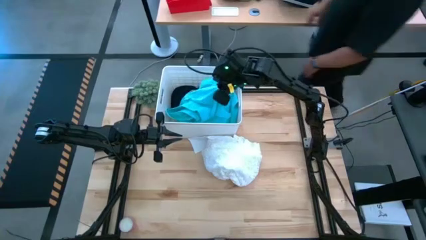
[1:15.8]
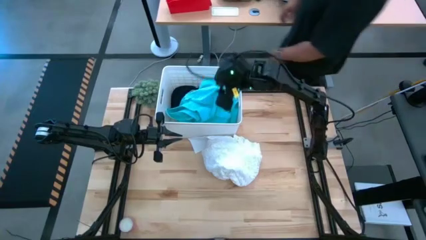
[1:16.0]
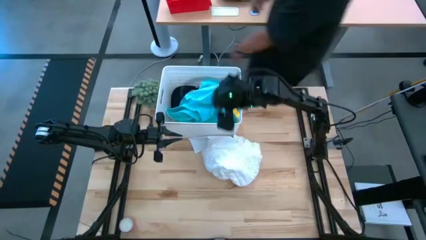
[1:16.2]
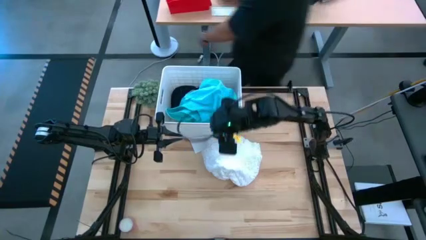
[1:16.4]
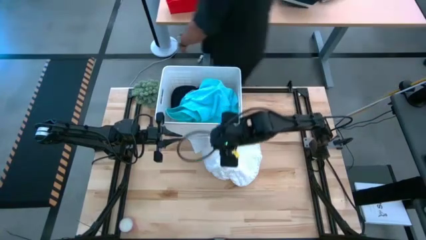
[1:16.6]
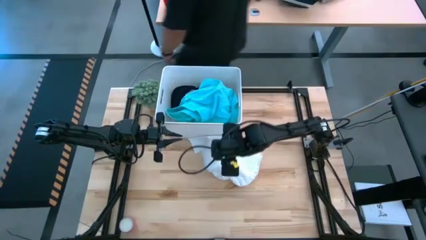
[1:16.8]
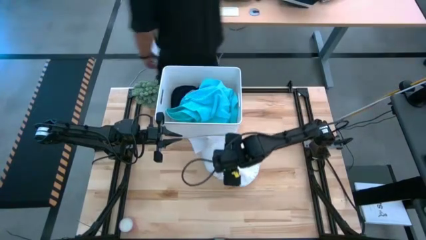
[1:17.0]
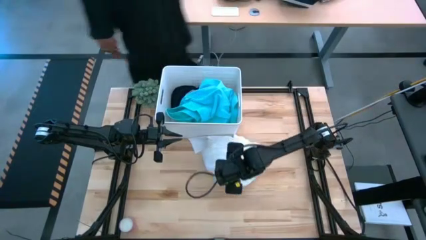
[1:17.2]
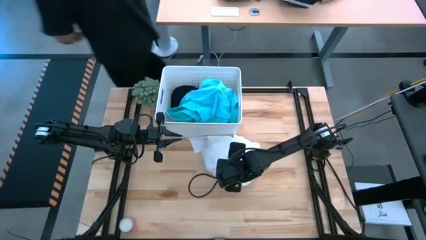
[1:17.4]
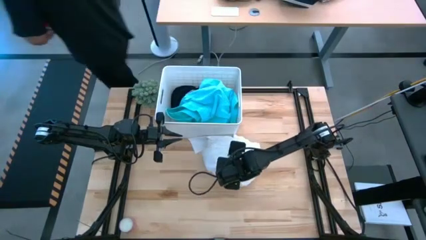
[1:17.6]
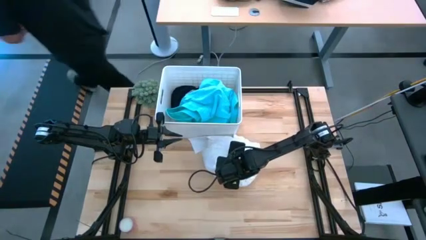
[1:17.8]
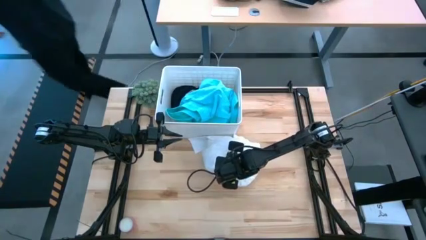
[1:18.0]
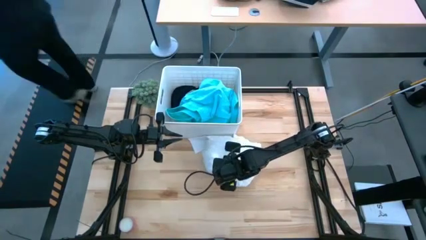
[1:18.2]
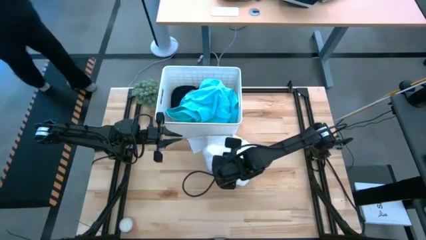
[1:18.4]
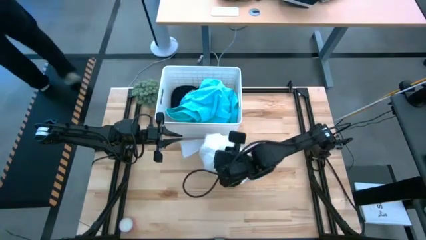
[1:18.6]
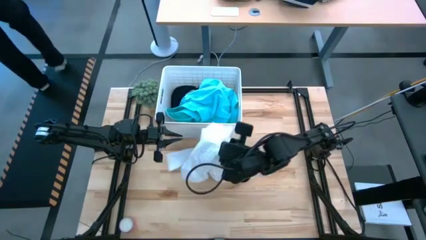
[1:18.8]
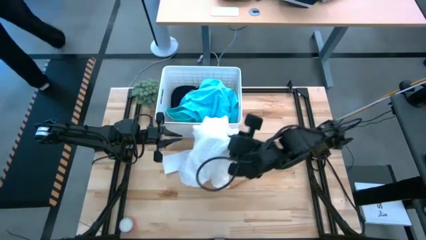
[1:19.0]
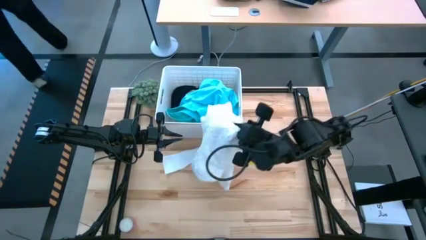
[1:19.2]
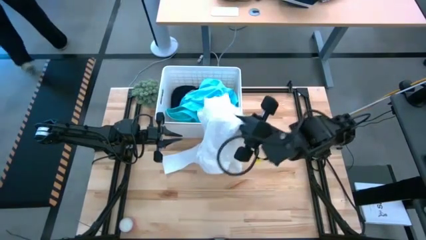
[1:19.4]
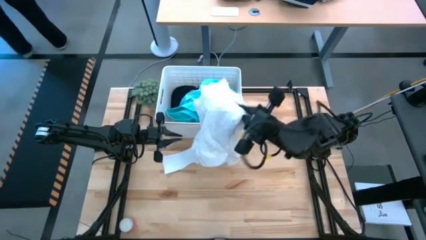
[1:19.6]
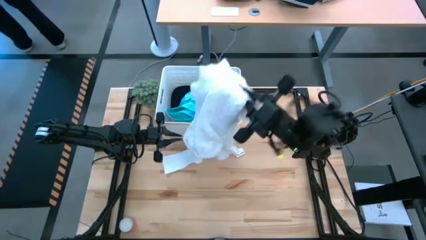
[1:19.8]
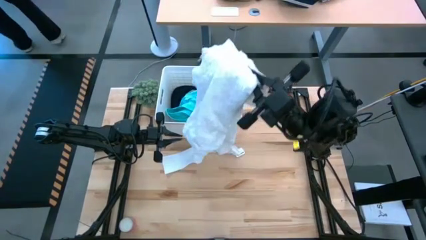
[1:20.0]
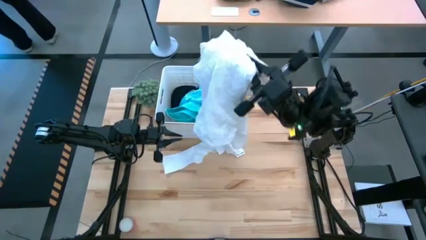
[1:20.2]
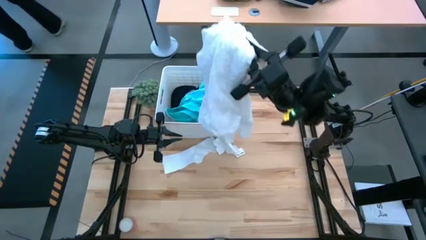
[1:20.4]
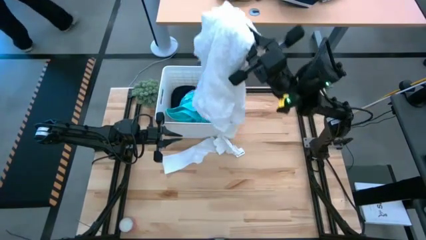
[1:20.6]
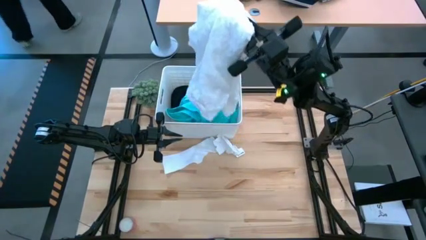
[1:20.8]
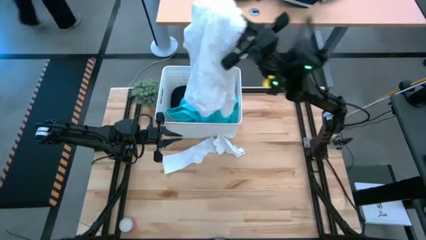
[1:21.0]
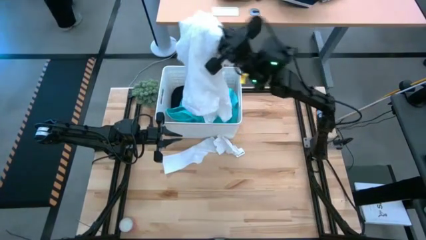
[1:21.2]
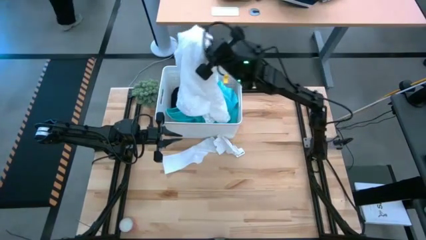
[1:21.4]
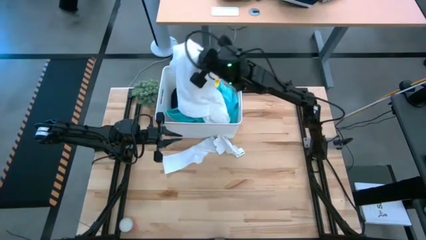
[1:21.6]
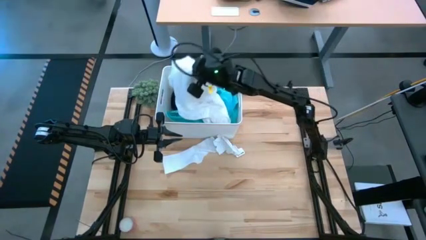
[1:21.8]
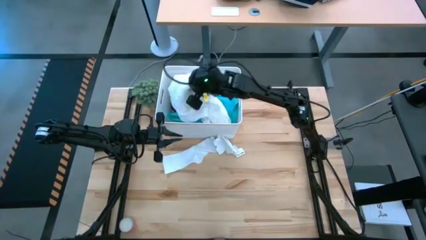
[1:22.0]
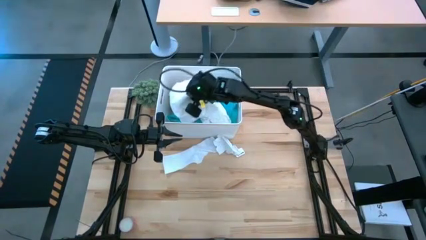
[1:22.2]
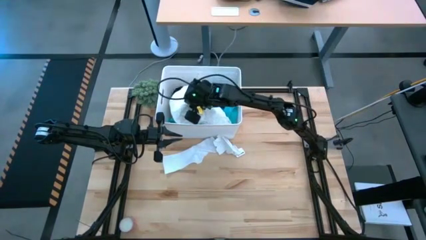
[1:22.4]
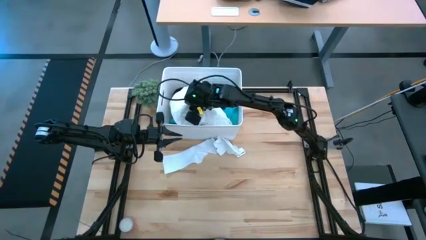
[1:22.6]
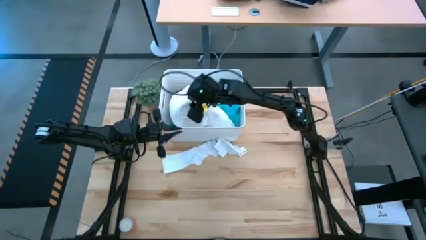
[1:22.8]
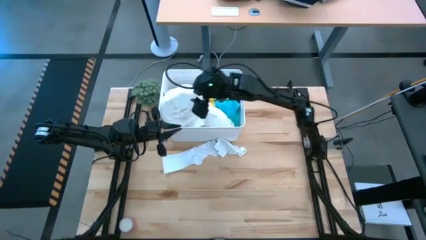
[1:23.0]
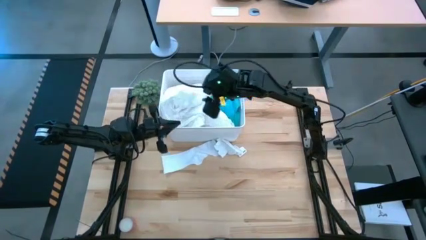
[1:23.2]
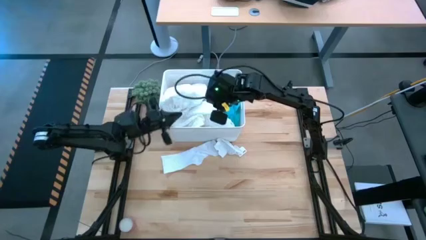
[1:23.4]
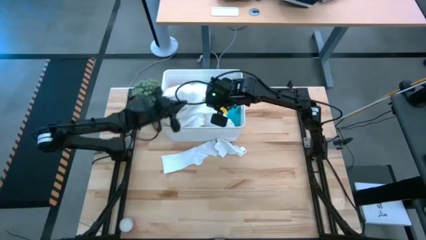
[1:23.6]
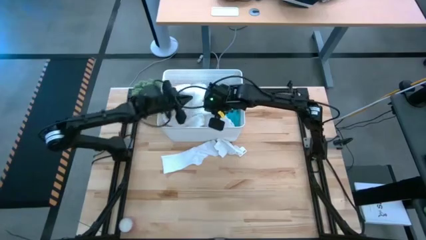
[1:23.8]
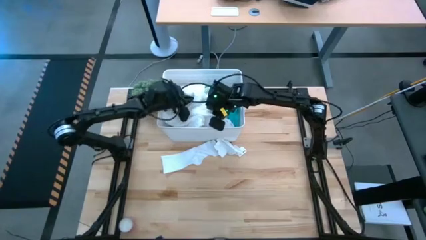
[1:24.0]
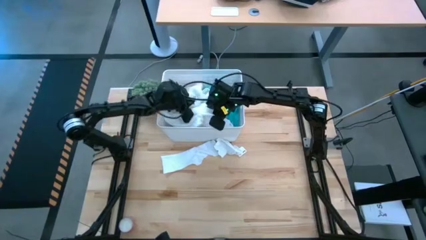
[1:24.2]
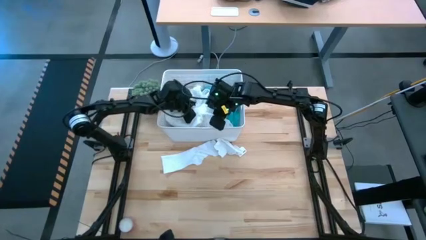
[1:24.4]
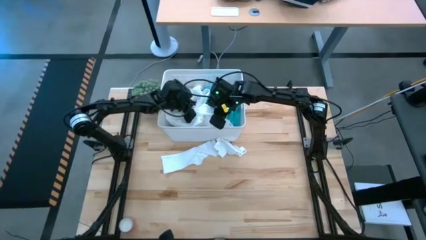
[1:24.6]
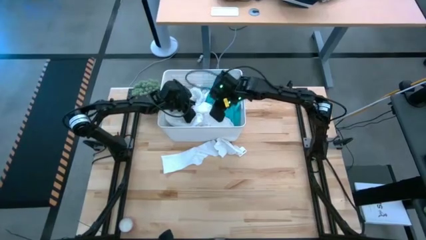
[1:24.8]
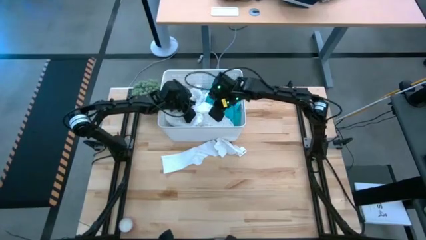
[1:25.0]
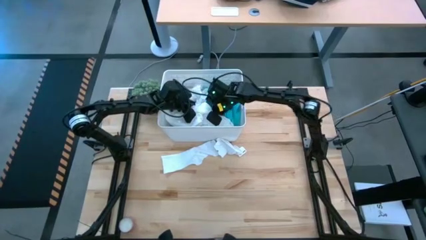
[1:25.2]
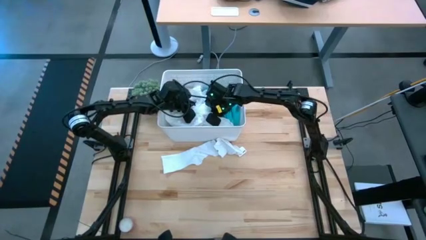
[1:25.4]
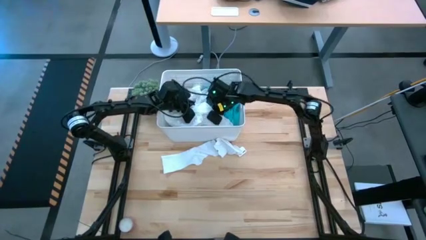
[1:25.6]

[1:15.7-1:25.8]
Task: Sort clothes
Put the white shirt into the white bin

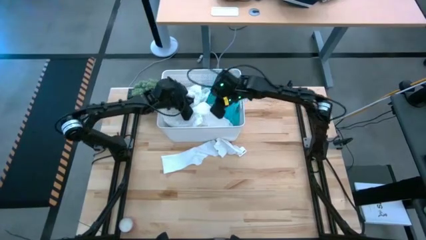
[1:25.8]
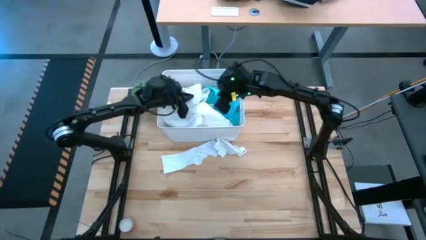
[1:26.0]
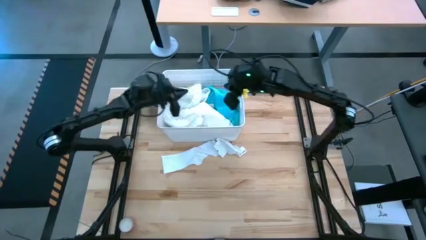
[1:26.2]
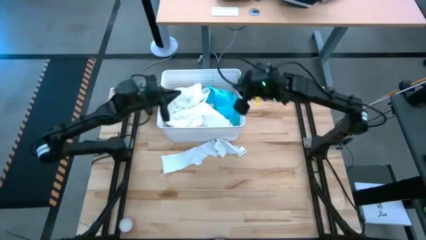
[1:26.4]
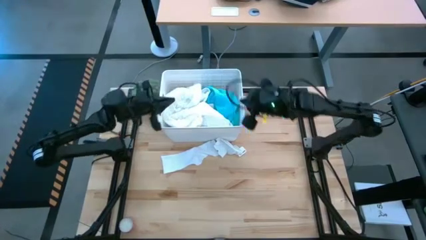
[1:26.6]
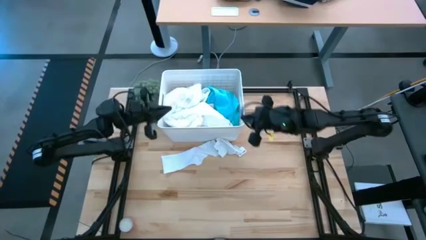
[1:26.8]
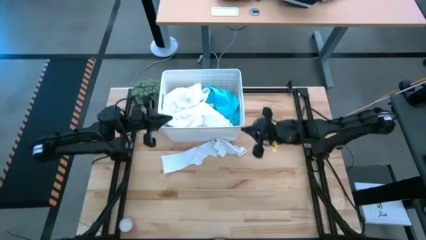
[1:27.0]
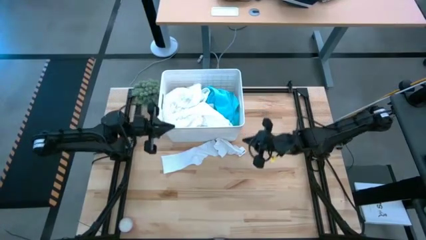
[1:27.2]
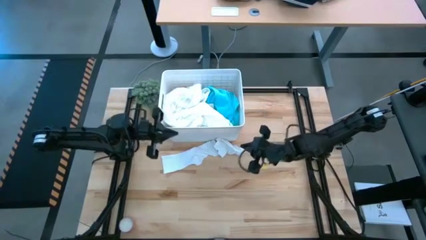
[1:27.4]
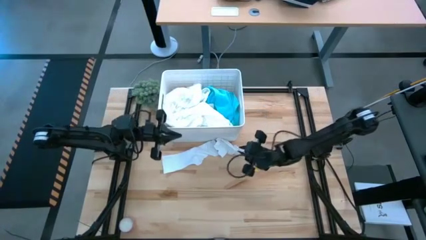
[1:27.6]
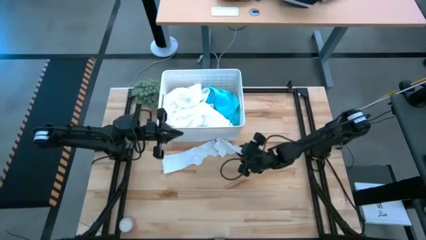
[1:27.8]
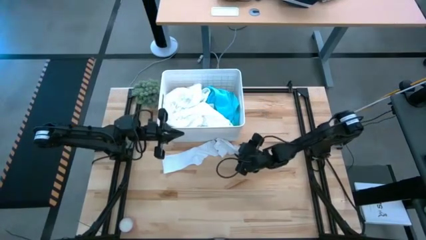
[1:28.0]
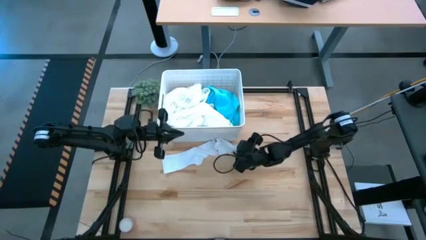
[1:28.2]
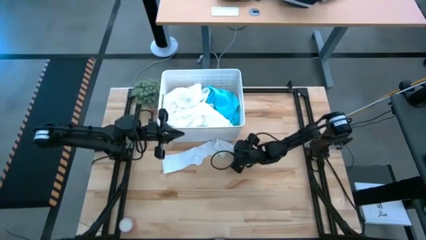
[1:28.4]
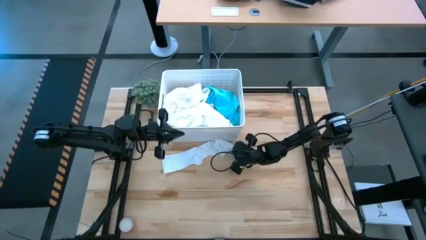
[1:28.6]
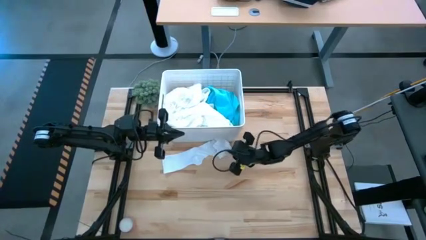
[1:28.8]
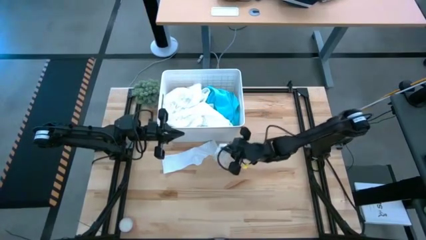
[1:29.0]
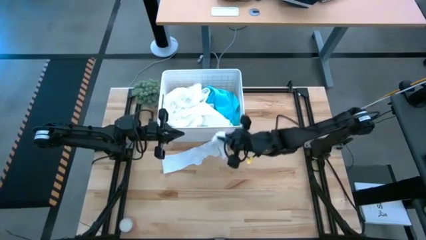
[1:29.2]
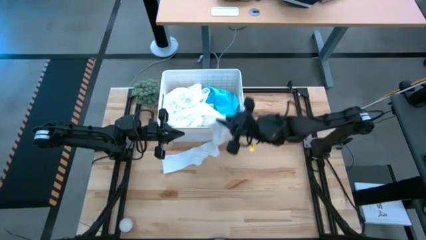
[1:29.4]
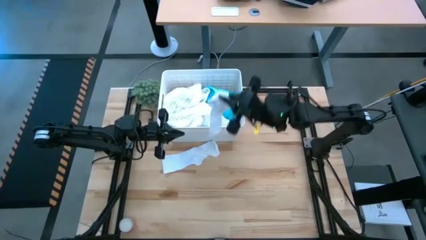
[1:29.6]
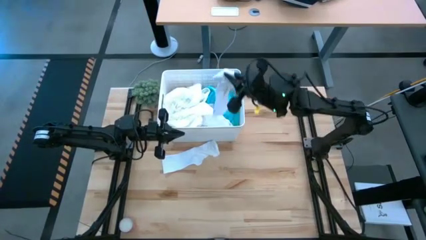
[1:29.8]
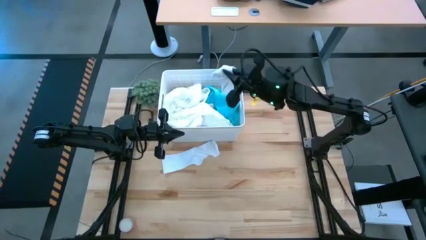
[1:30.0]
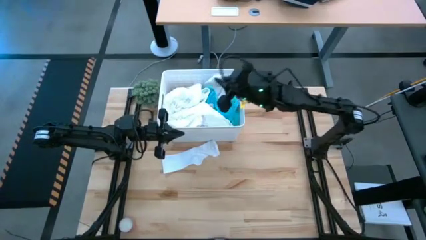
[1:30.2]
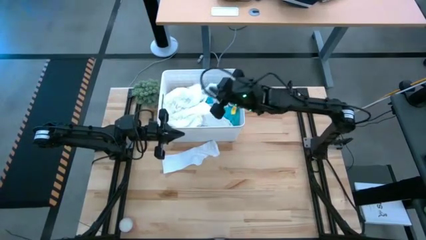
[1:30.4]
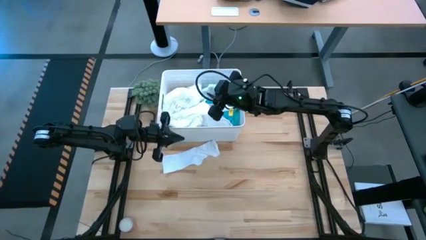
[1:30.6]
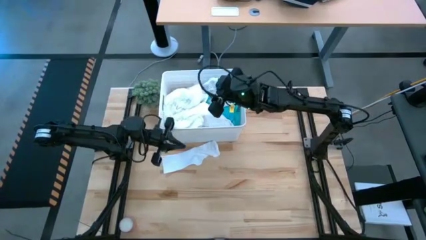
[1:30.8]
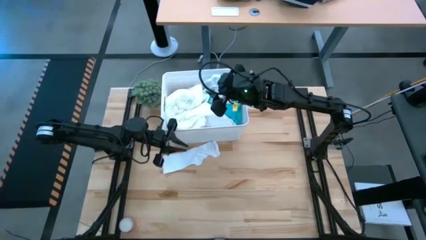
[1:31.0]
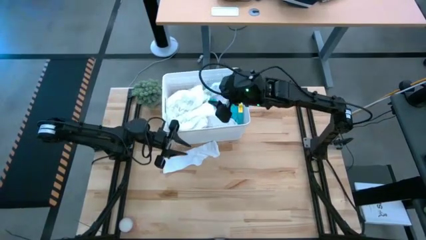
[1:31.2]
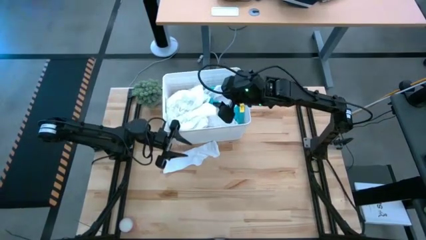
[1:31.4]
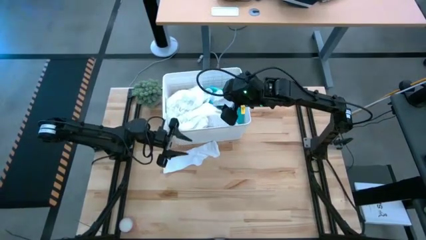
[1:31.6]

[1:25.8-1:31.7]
Put the right white sock into the white bin

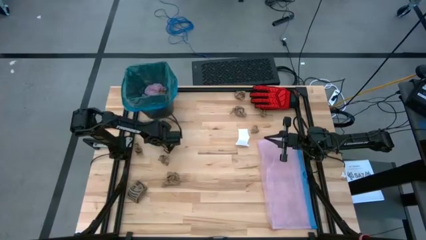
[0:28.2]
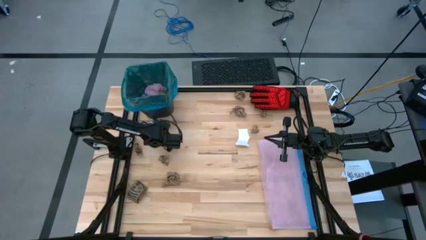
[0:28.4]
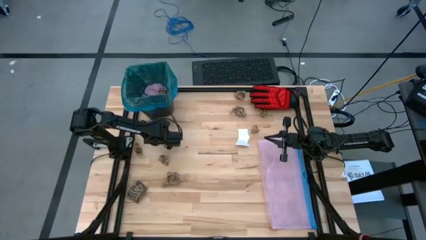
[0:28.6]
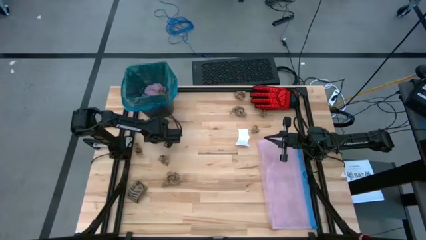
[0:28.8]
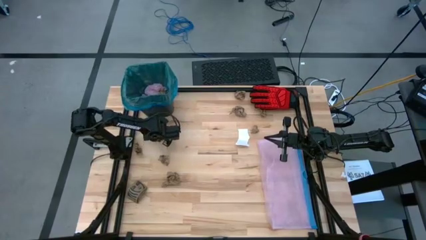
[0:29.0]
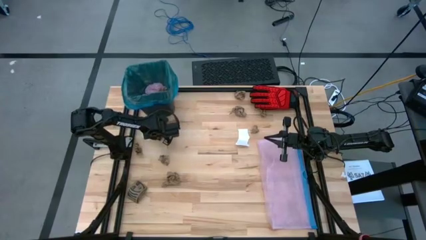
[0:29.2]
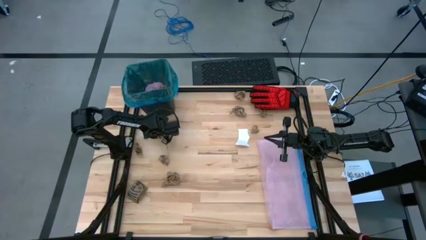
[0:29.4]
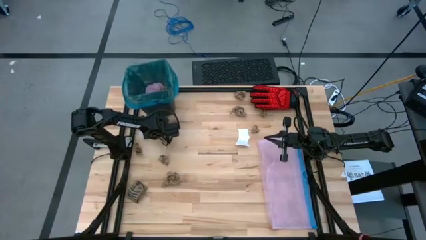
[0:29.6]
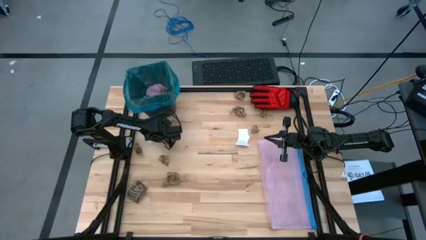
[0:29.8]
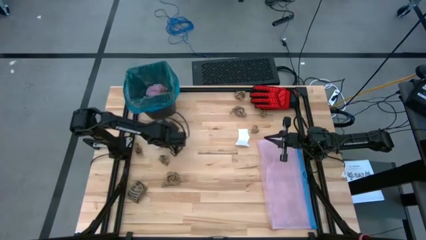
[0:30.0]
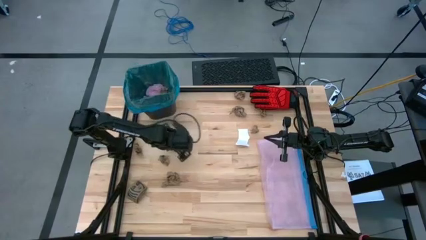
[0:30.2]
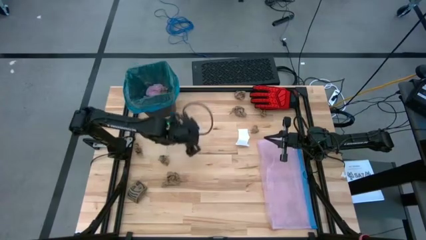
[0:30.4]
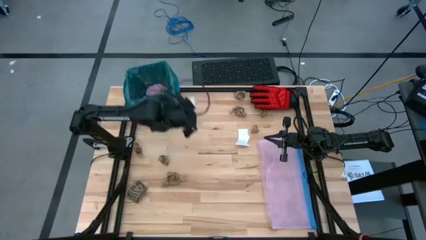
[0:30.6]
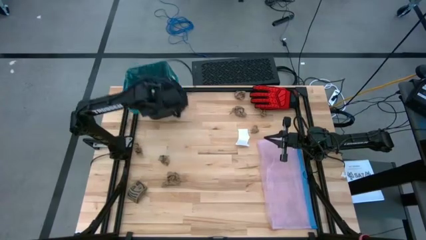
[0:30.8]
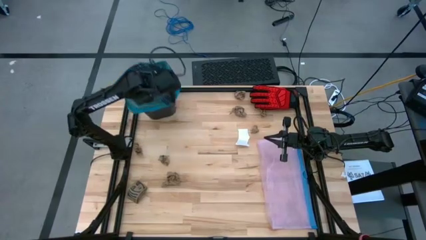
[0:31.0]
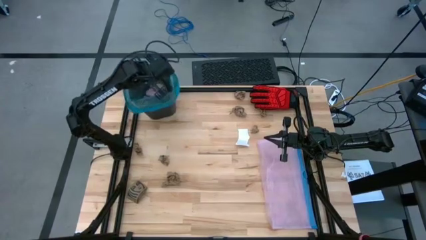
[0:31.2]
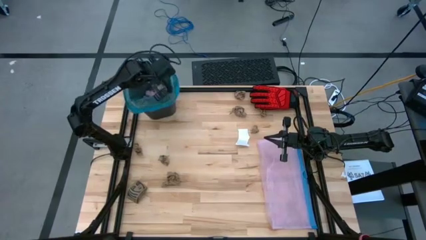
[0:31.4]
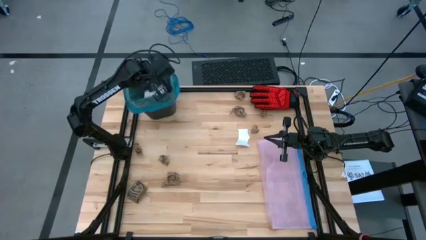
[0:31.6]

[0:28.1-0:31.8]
Task: place trash/remove bag and relplace
Put the white paper into the black trash bin
